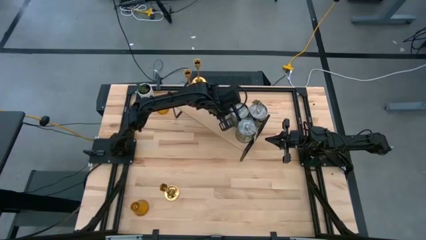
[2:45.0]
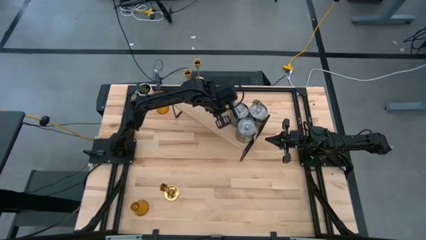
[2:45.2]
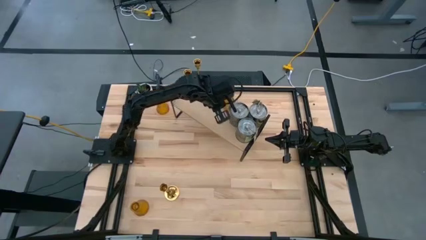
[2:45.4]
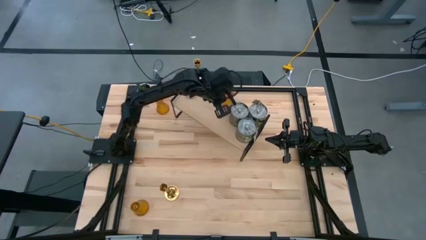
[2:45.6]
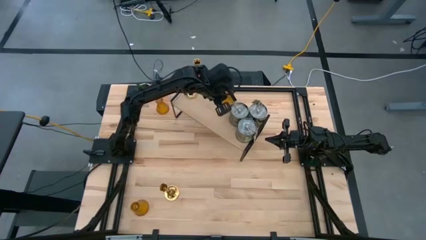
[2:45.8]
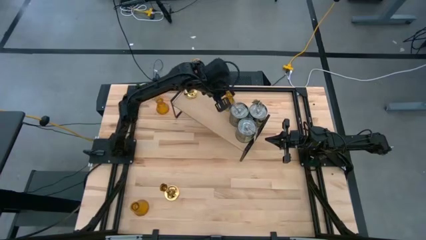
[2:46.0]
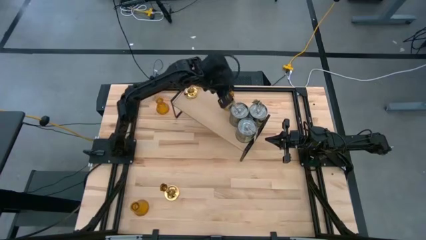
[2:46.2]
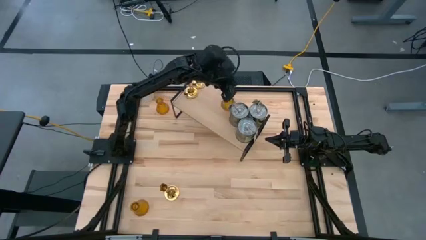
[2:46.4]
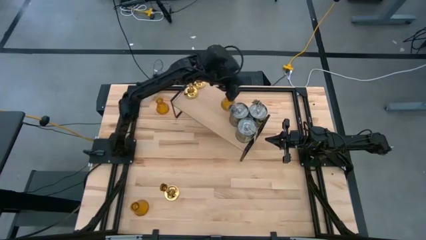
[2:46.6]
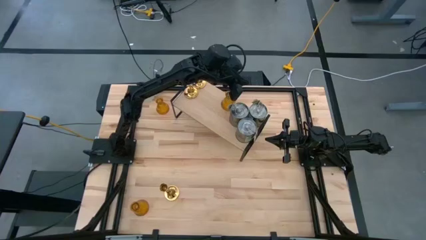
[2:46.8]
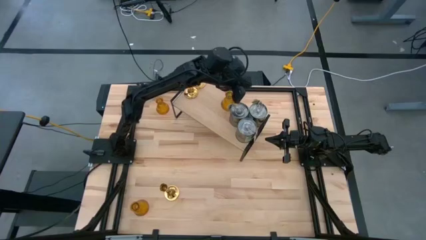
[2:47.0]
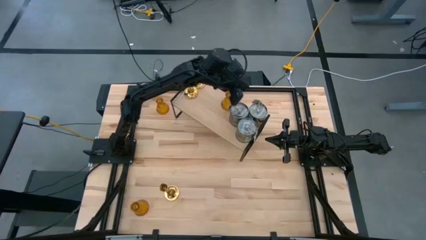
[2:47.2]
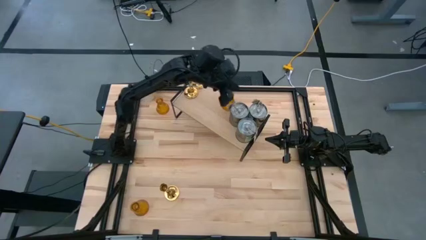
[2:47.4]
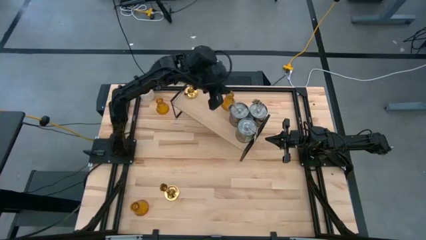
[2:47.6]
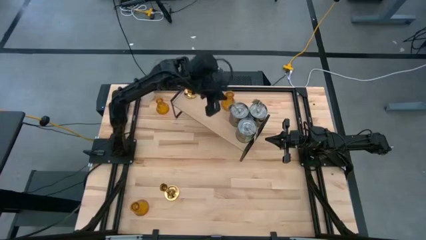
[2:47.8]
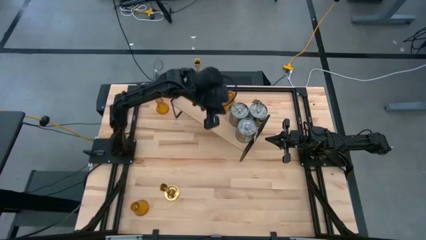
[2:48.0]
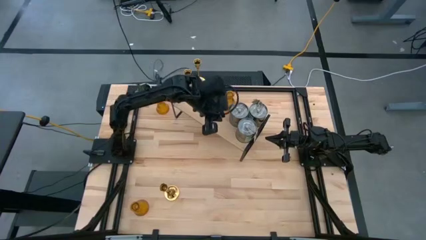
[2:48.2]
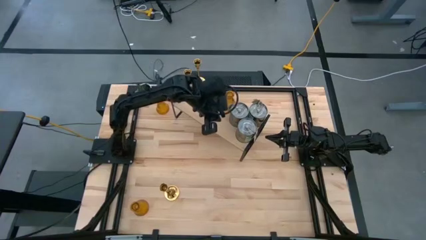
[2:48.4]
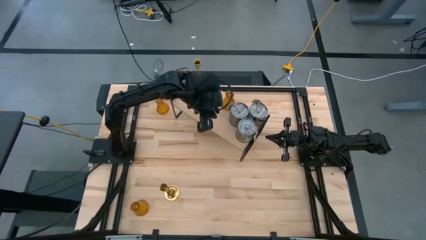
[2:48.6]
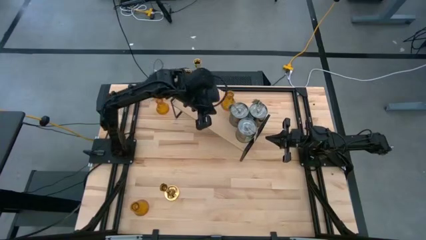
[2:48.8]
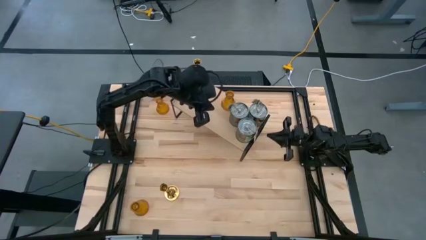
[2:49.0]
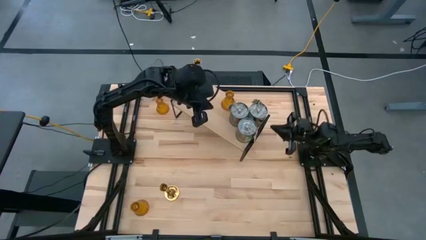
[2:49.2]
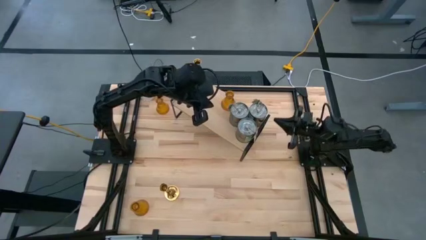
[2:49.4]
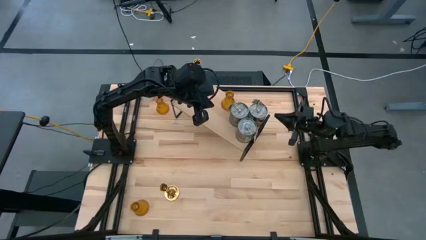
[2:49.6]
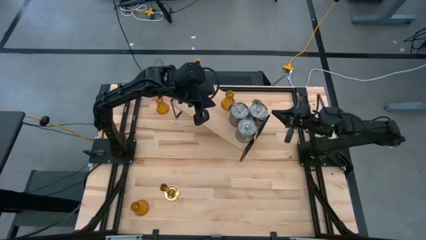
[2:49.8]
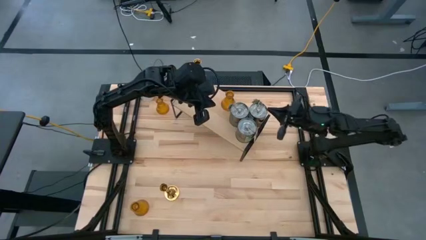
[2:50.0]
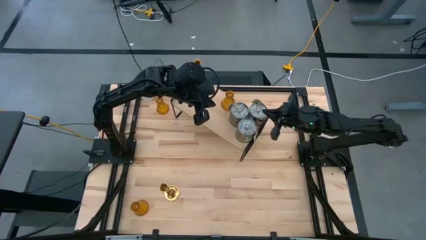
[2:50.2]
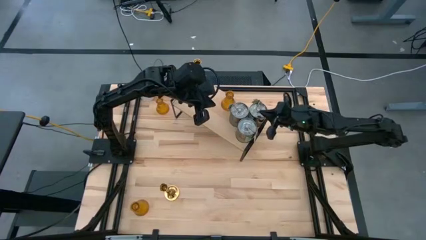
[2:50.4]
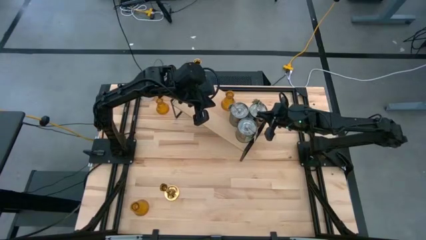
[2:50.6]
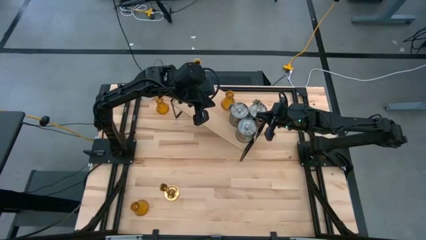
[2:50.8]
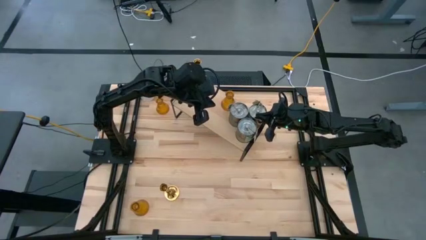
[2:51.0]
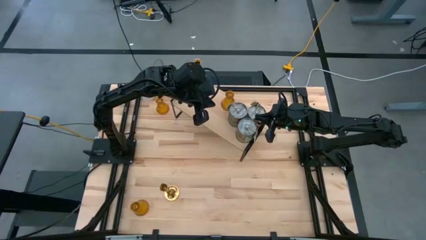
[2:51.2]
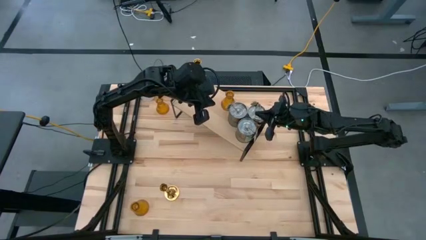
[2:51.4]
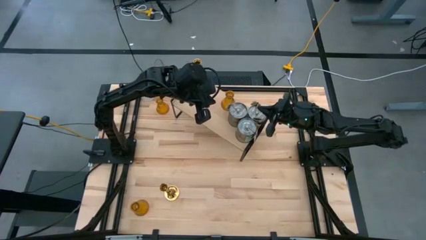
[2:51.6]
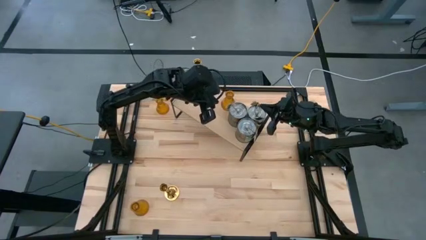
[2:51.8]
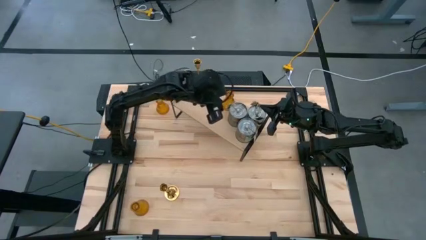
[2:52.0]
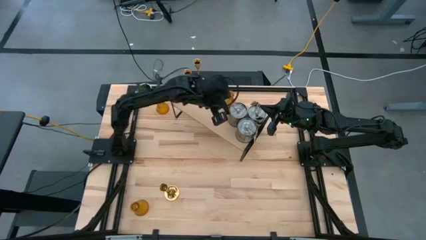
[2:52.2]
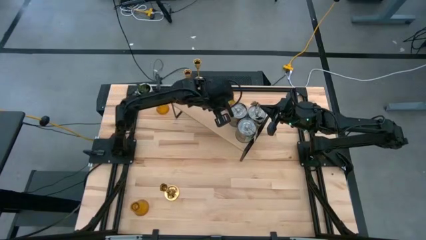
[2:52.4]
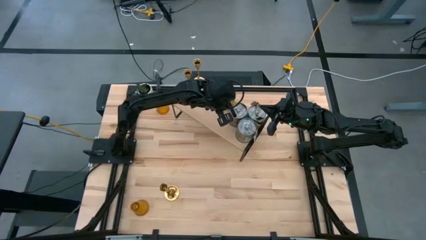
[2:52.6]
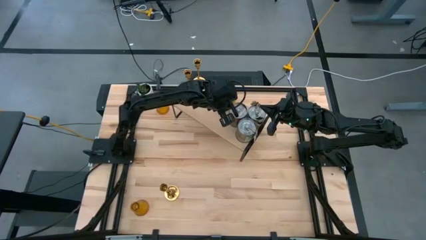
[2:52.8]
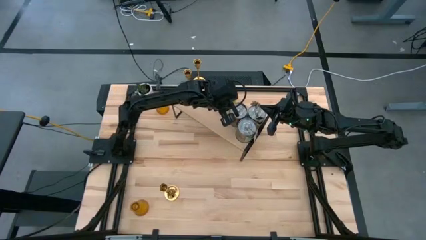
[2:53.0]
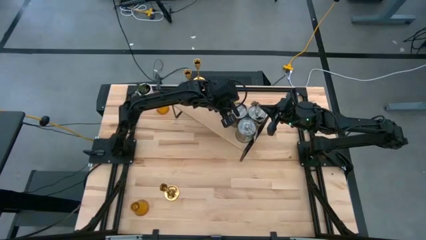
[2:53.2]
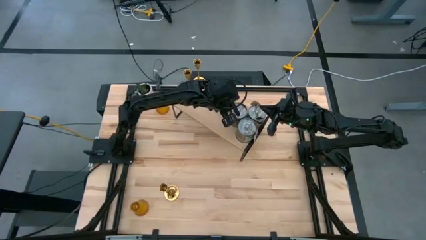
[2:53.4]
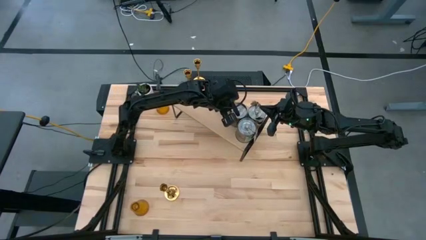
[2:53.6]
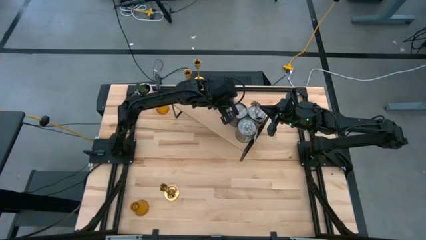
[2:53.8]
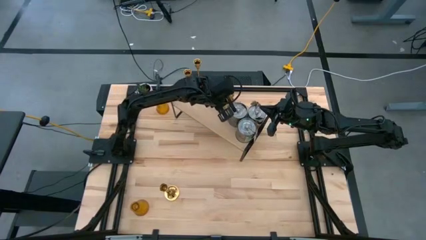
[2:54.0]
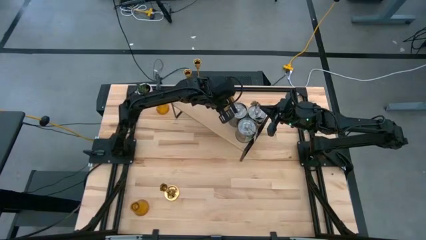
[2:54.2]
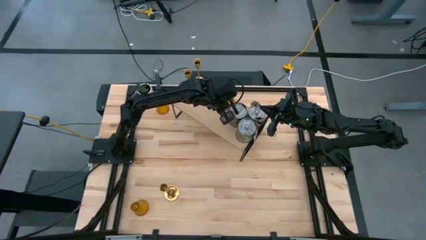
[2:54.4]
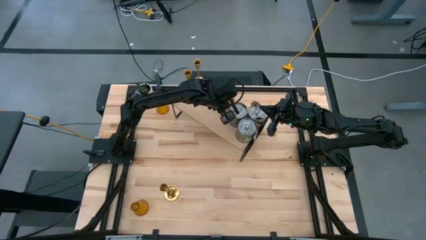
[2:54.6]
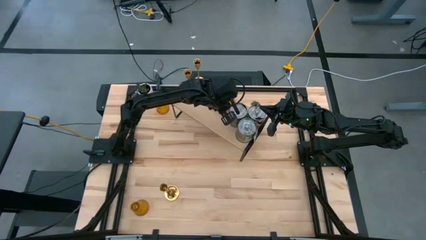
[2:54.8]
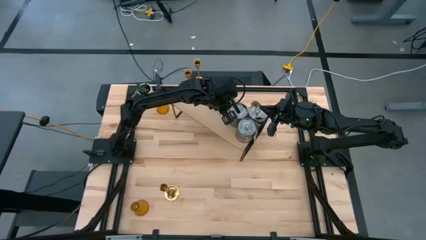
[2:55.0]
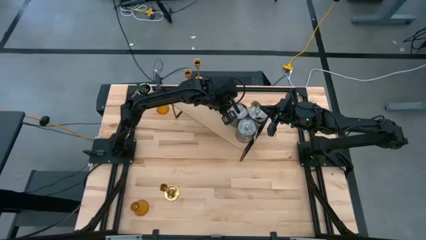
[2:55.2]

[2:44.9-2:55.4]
Task: Pick & Place candle stick holders
Adjust the scented candles on the shelf

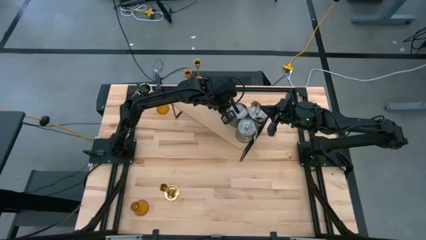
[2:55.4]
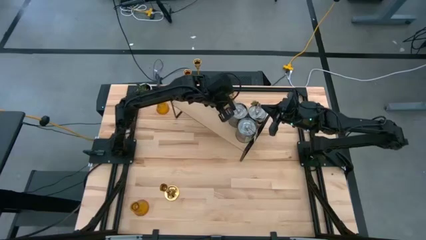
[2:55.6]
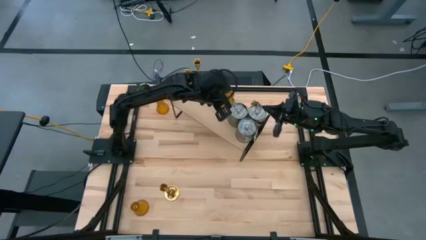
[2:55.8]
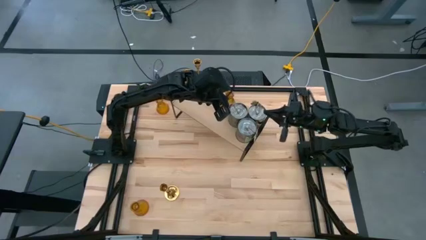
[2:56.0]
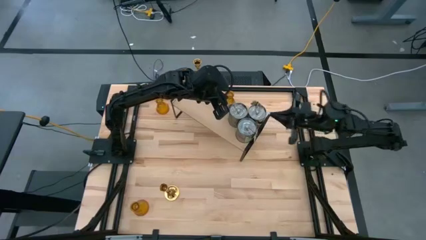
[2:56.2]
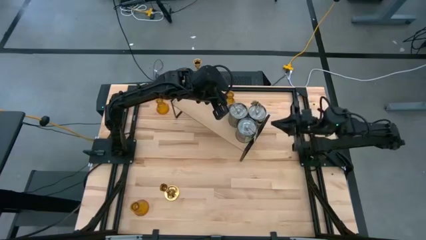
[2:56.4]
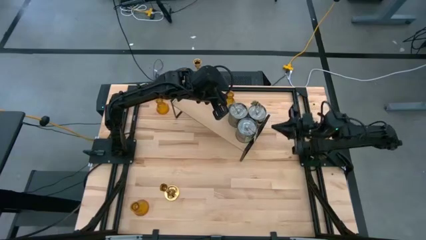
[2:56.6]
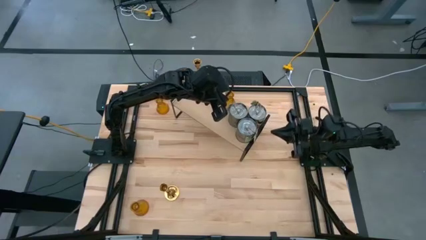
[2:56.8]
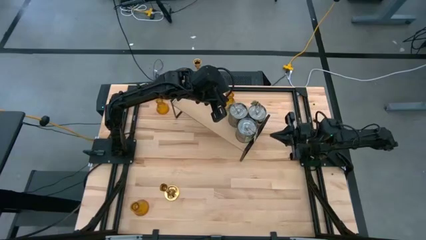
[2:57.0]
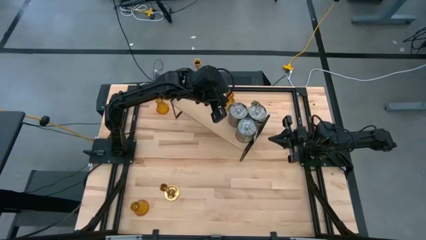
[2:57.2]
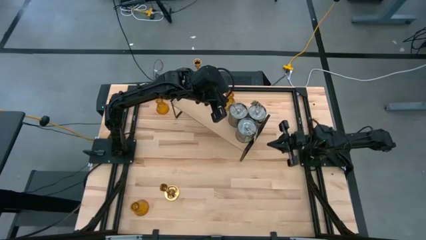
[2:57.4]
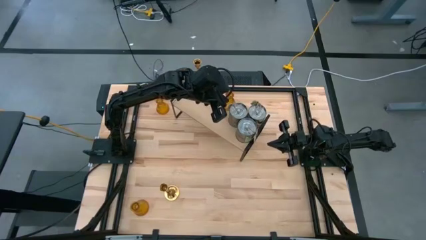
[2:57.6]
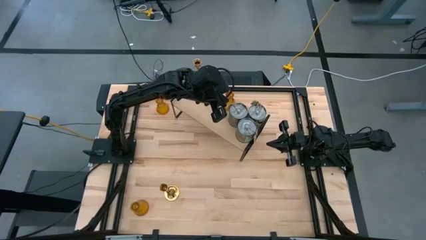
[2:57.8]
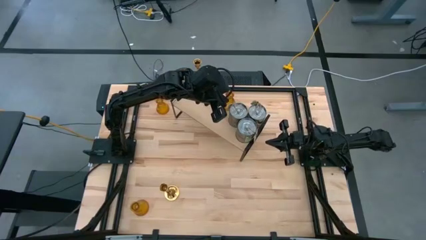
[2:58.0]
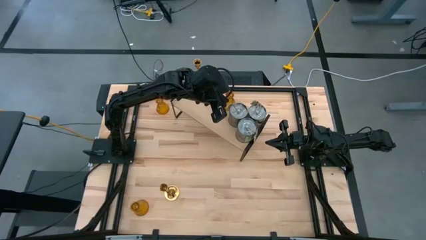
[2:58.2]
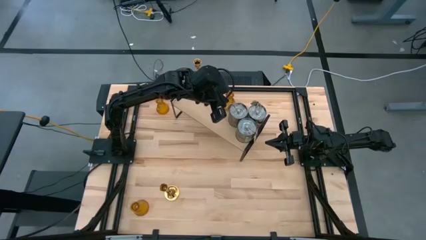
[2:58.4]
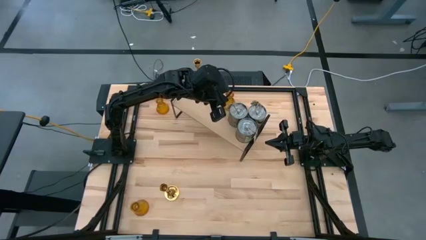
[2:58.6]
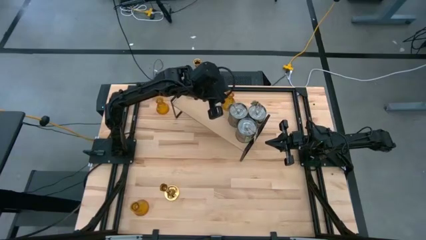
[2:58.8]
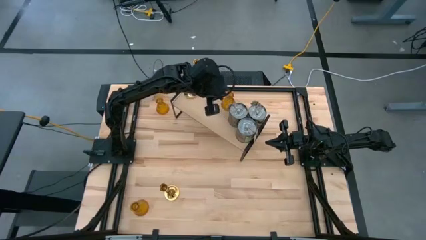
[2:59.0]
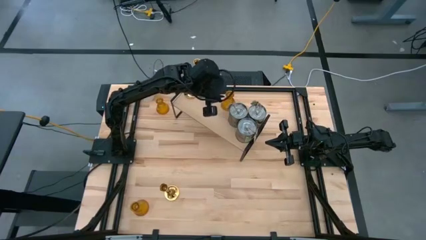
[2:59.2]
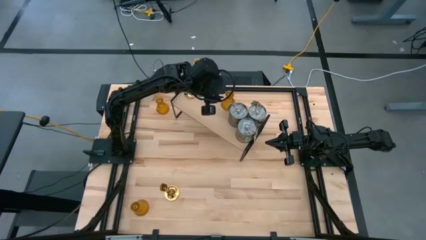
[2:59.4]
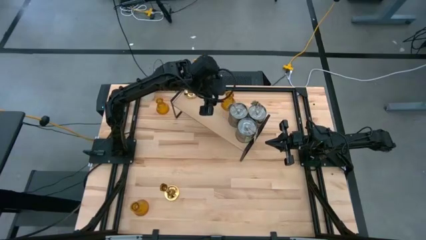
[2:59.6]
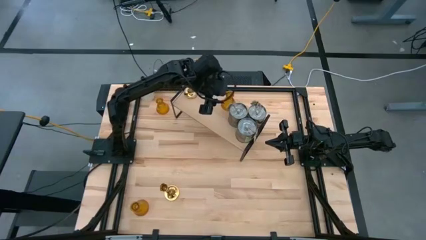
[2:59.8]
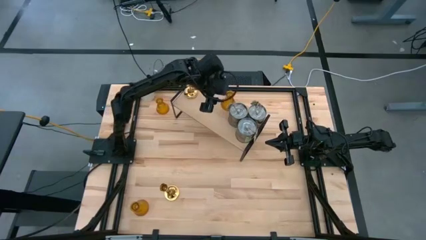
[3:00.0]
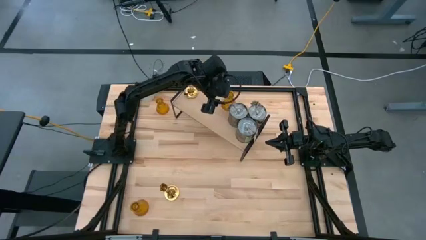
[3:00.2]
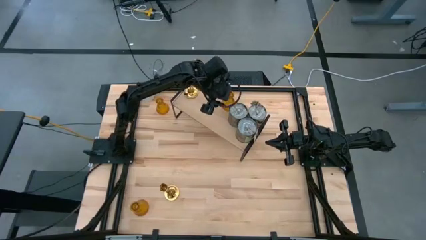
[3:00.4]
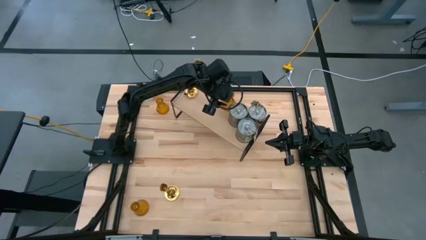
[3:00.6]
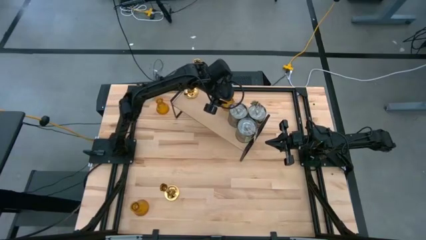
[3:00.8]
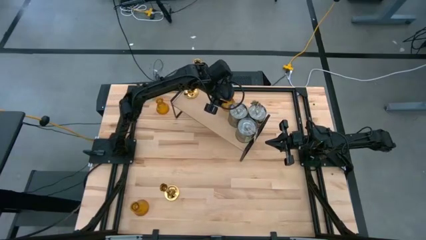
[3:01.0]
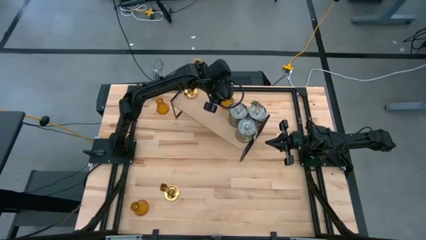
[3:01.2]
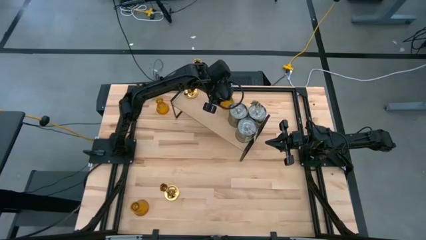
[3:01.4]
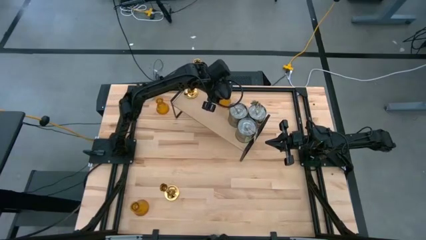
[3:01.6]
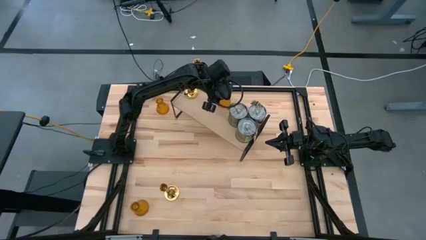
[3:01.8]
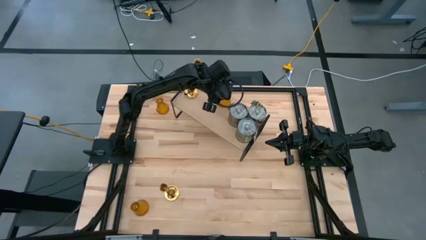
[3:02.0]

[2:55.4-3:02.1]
Adjust the yellow candle holder on the shelf
